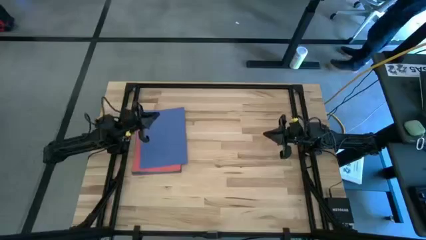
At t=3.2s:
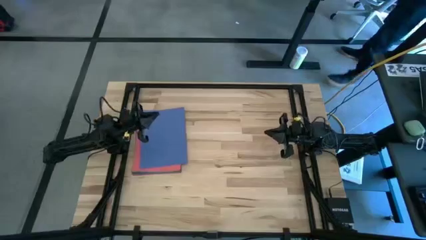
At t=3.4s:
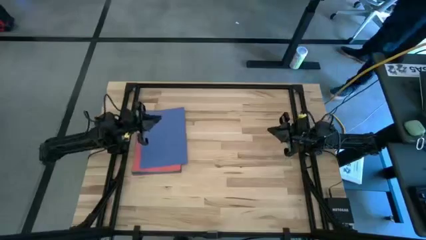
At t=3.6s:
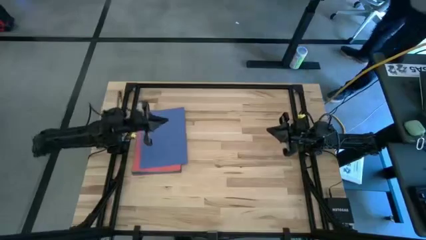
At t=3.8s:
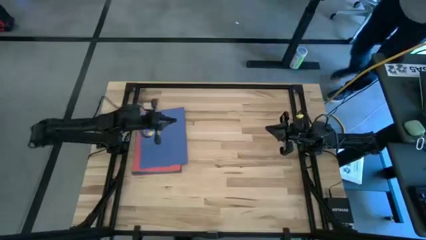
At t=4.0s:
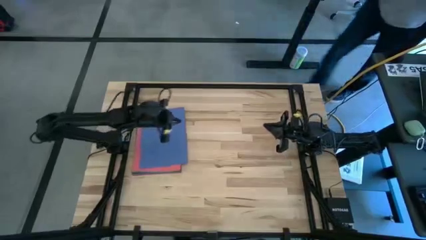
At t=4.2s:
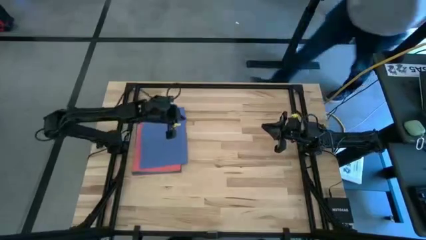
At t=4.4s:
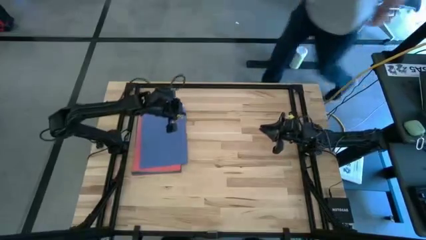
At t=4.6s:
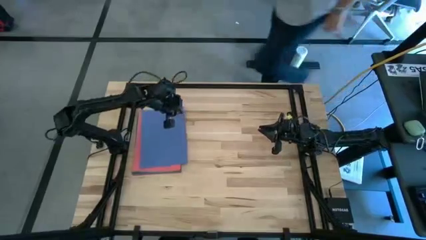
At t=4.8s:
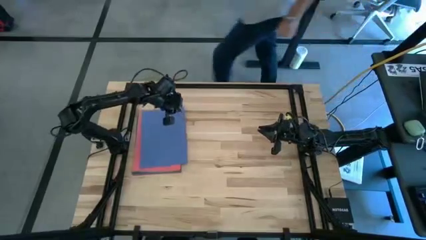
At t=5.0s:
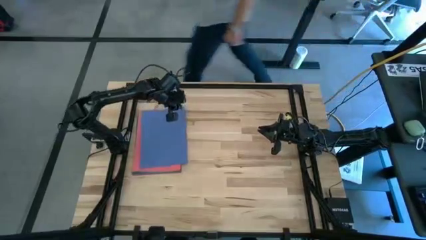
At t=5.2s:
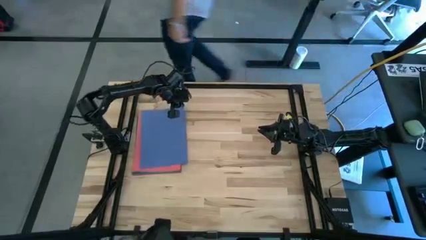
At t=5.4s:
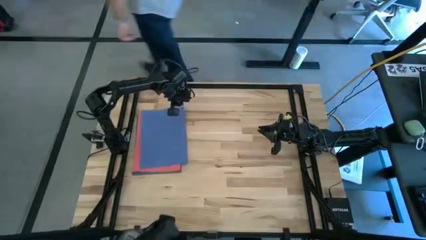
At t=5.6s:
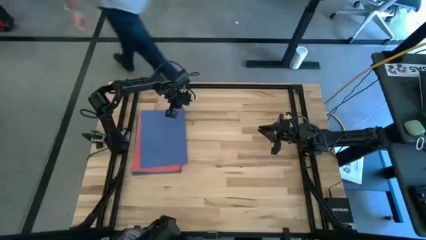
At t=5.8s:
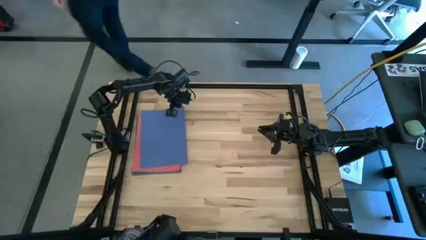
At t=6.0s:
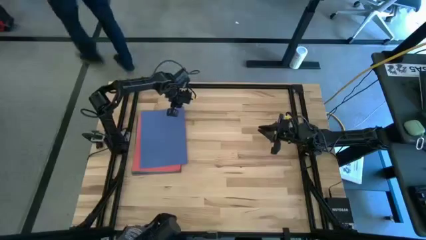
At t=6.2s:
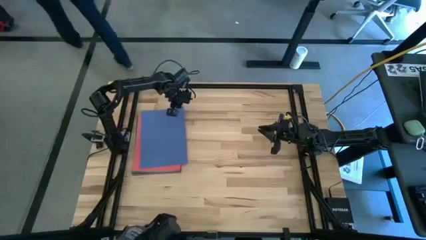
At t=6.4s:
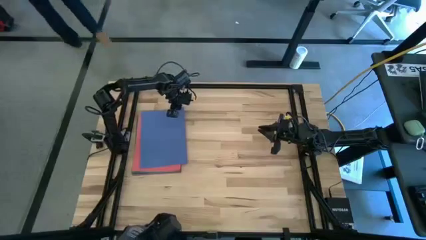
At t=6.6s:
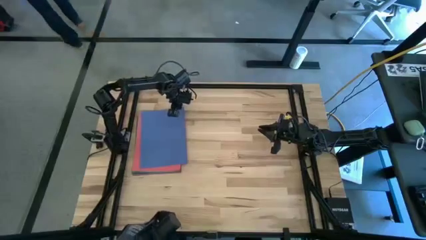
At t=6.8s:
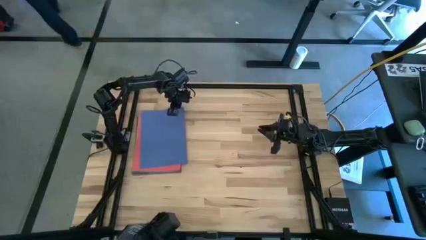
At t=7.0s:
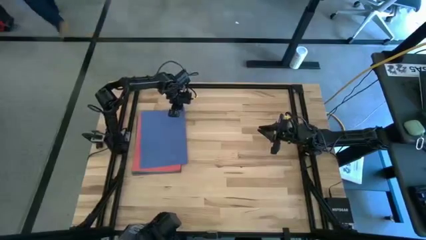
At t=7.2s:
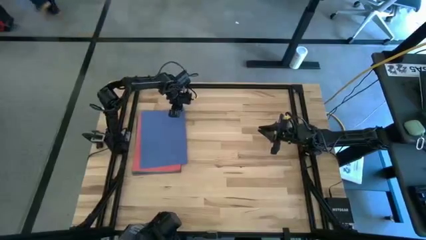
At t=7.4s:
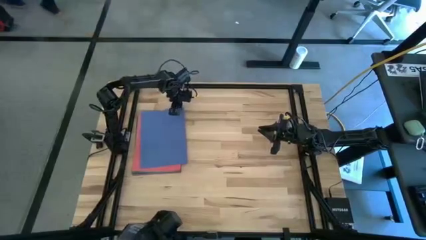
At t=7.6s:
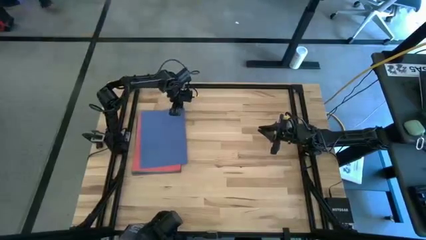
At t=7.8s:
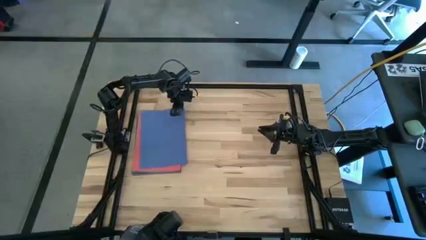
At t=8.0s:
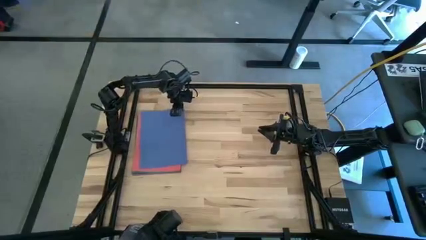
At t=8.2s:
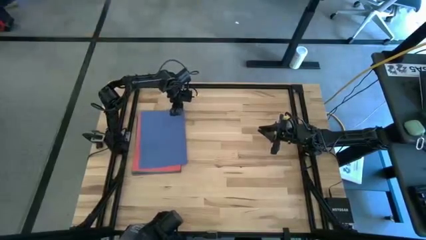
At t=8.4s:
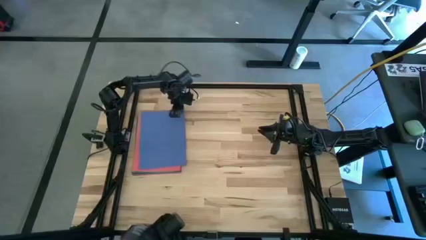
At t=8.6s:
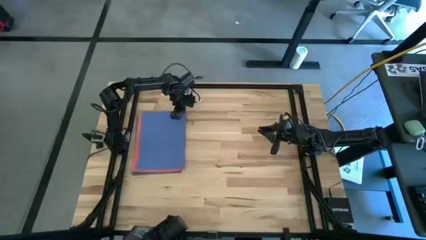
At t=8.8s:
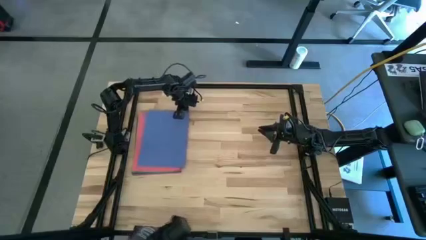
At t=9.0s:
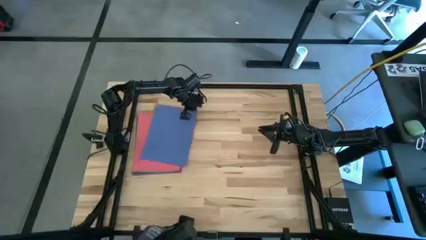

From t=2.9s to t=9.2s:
Task: Organize paper
Move the blue paper to the top right of the table

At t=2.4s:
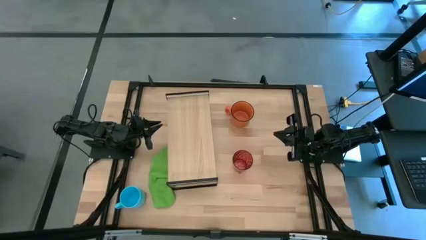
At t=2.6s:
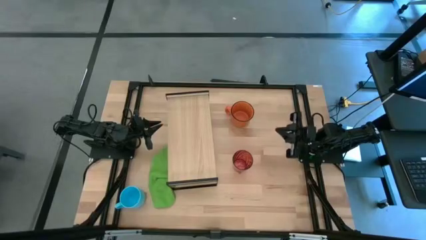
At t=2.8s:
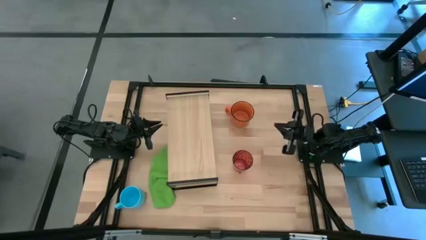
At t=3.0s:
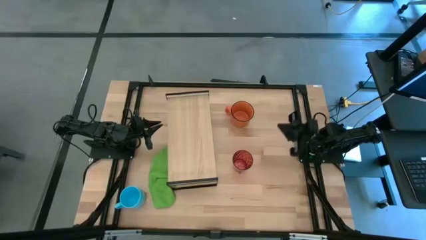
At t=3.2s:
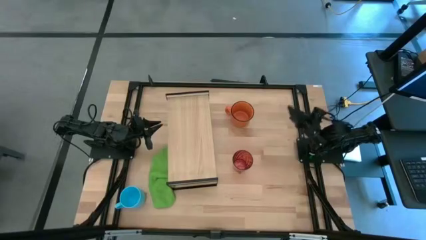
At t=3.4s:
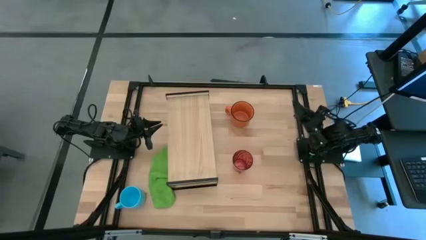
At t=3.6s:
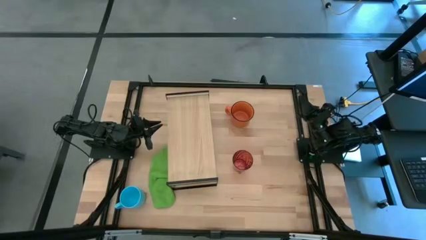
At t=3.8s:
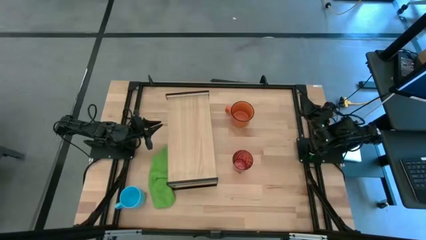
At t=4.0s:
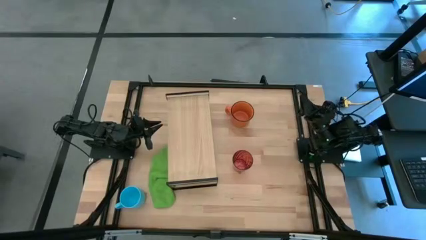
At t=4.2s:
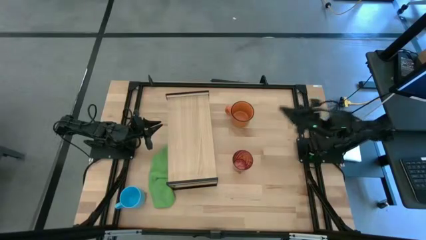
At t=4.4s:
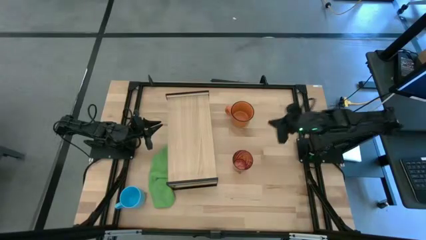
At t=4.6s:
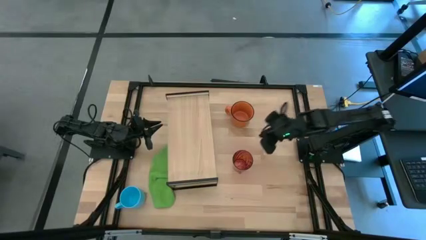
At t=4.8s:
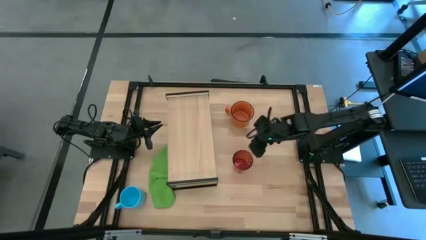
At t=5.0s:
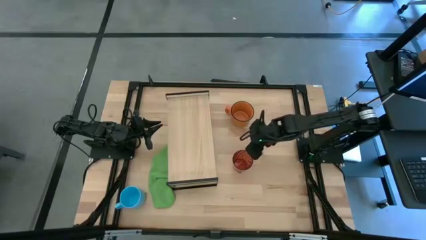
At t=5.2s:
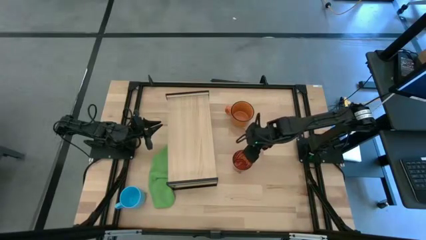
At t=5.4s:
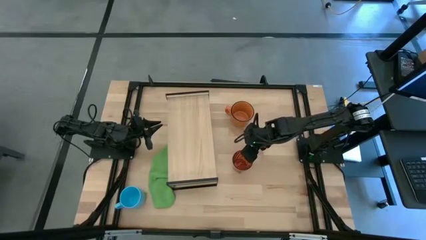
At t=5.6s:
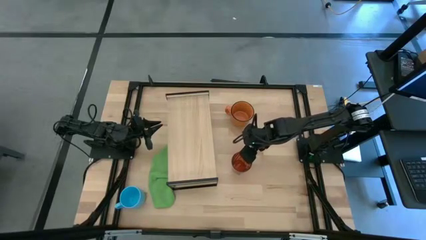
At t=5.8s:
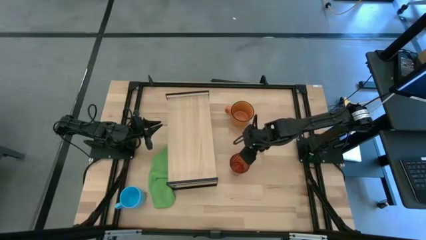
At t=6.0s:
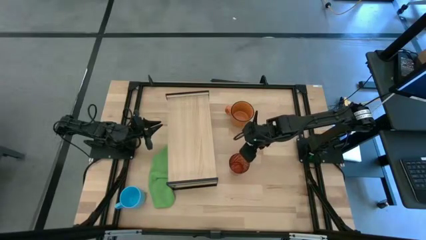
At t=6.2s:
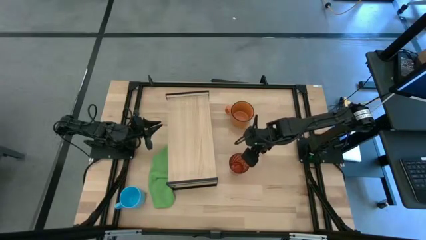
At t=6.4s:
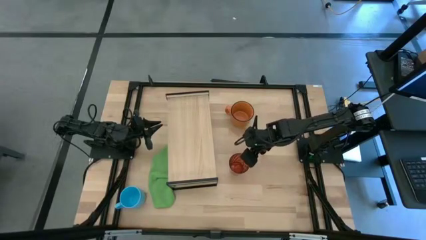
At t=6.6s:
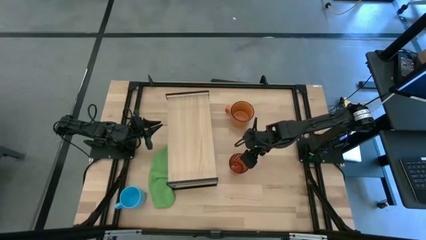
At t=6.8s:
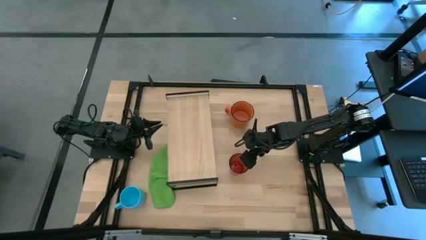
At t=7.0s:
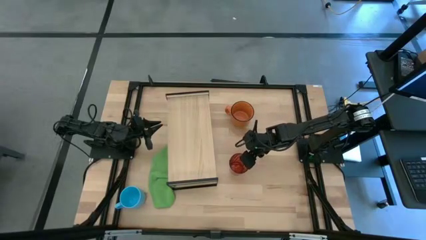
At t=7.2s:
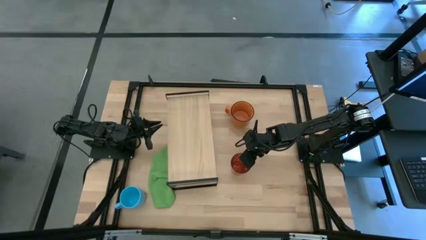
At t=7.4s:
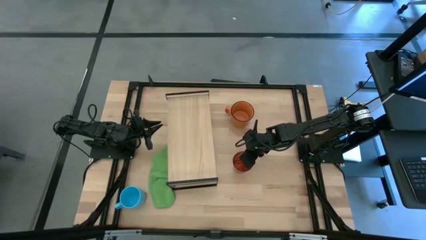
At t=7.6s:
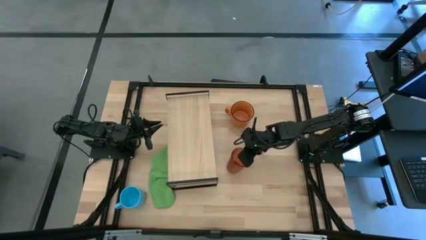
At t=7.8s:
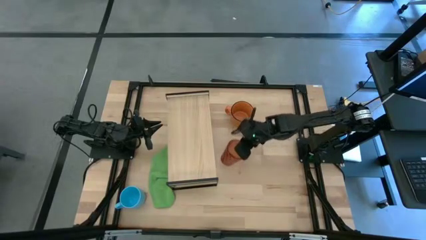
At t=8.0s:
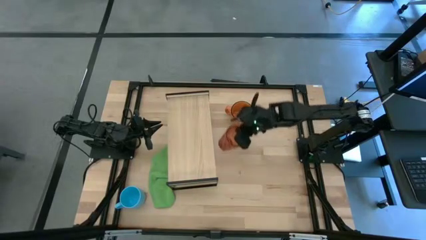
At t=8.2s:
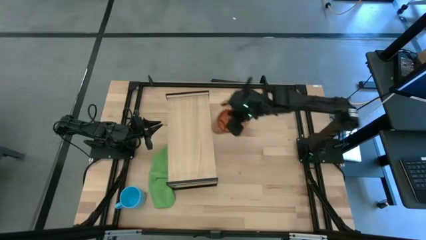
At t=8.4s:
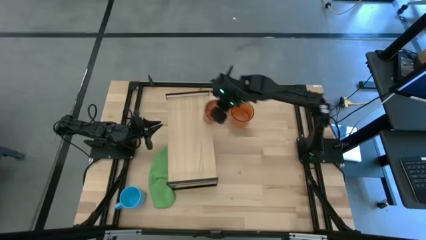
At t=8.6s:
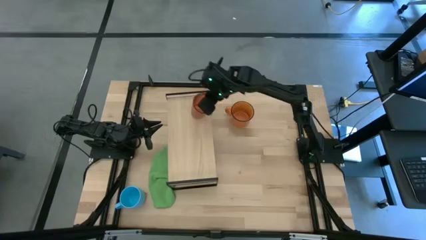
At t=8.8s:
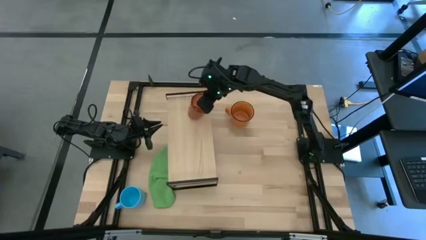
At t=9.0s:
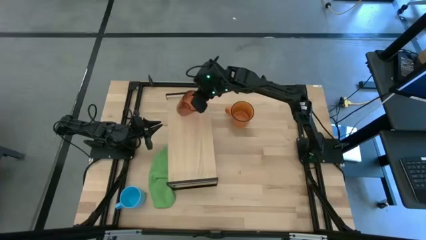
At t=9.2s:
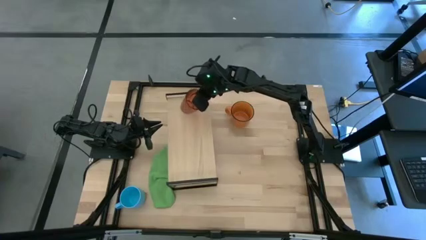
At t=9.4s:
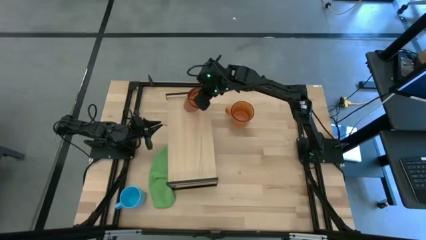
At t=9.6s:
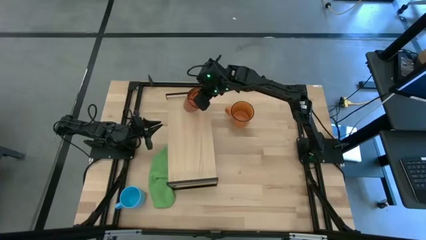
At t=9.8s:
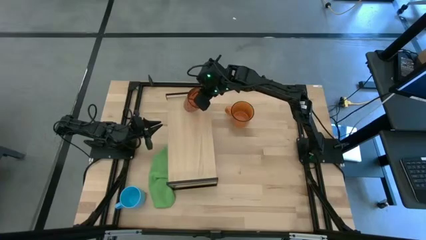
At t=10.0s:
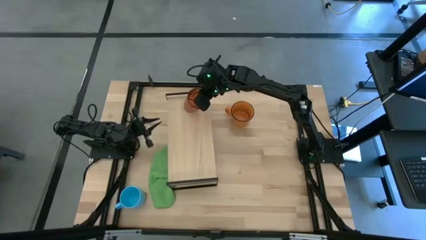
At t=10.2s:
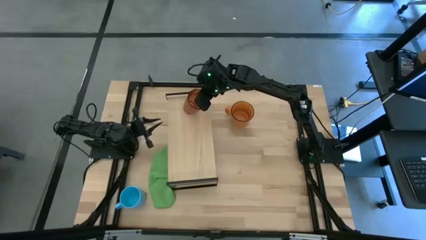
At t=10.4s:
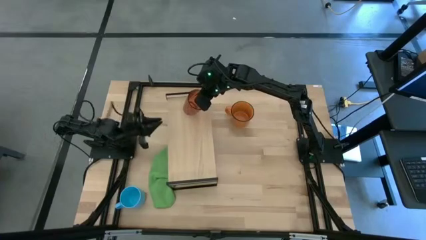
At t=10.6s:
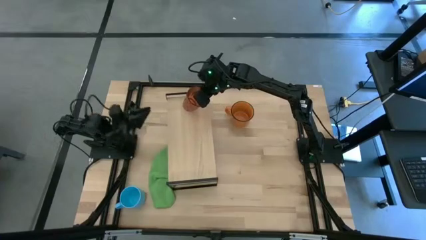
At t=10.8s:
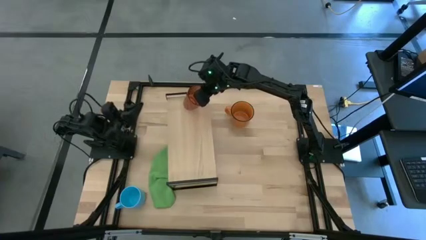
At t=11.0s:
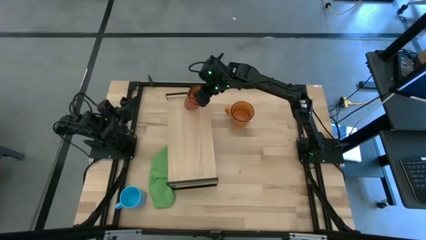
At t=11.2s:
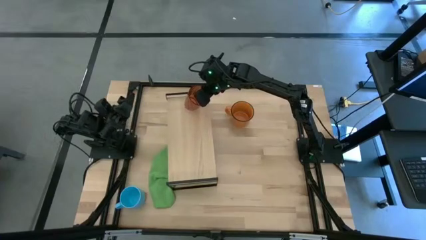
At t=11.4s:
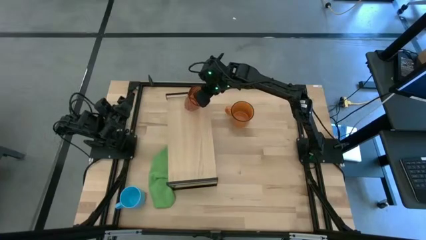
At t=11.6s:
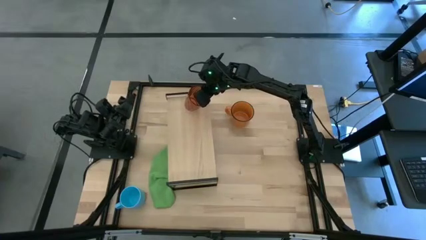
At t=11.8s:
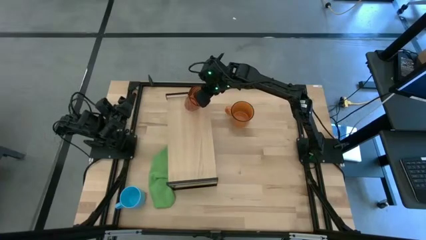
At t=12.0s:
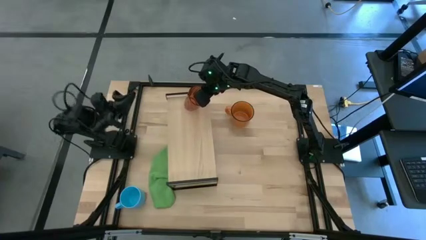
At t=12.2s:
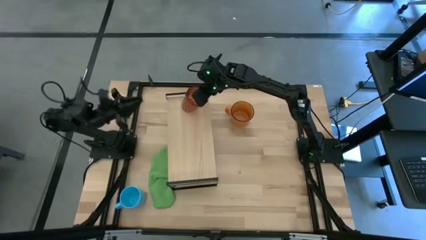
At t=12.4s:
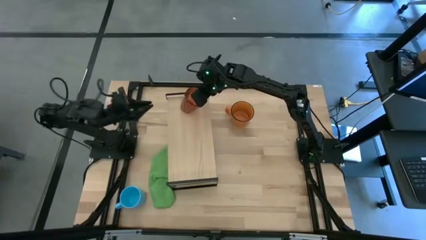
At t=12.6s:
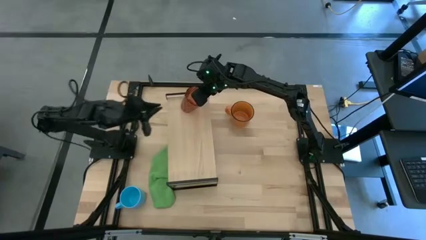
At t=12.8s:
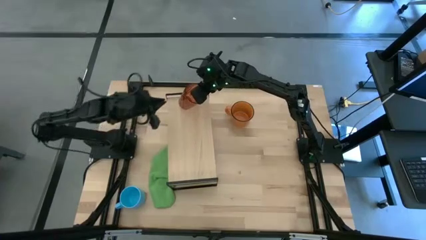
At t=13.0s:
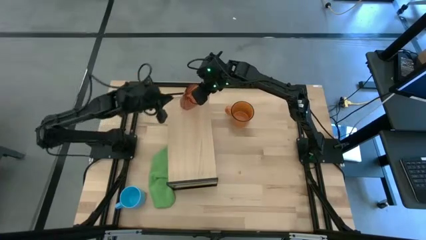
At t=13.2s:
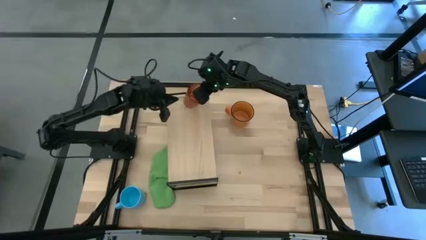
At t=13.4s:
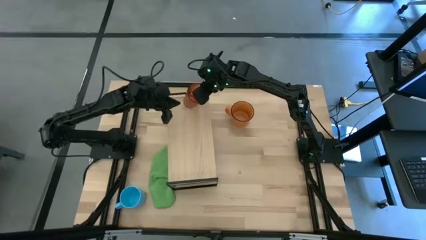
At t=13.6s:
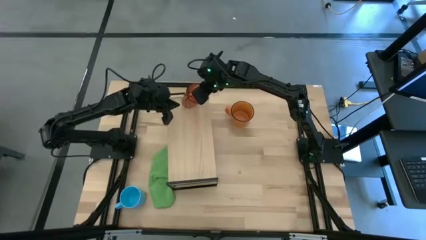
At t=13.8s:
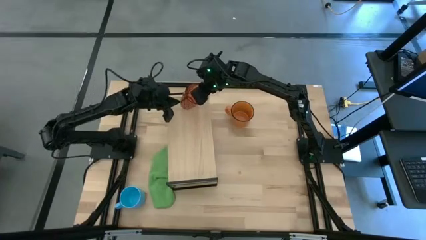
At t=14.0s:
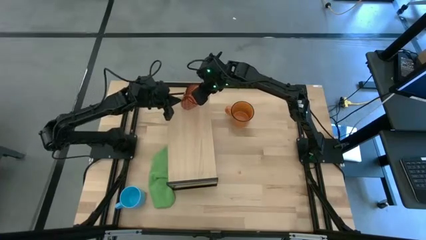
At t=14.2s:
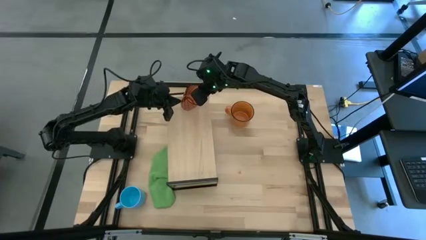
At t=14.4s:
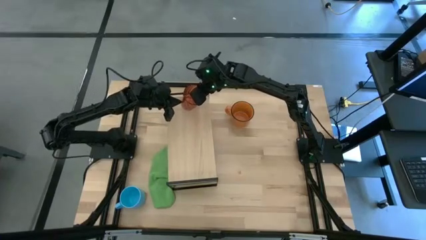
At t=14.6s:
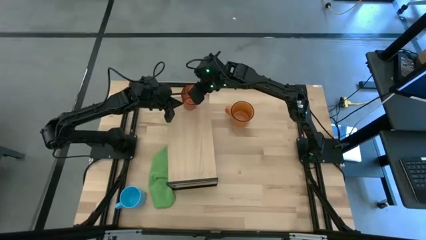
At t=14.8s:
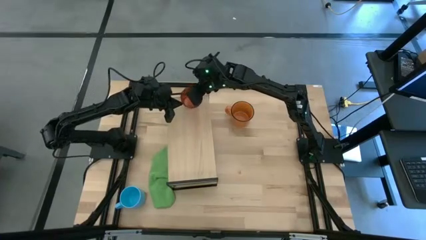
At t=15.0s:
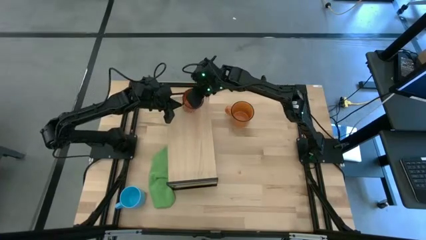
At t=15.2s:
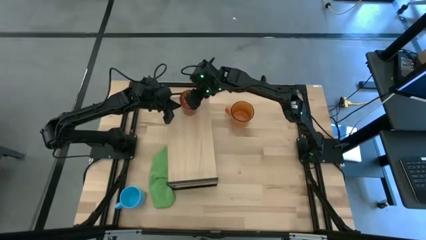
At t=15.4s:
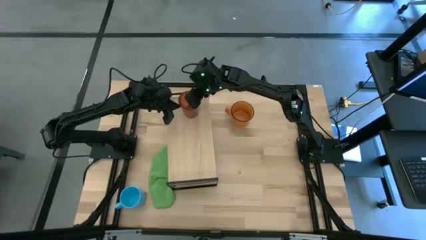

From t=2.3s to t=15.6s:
Task: Stack small to large cups/mugs on shelf
Put the brown glass on the shelf
